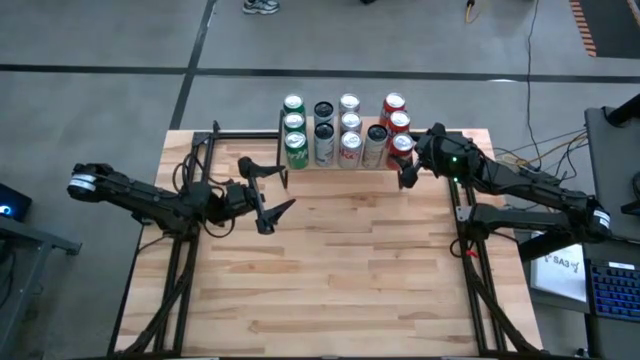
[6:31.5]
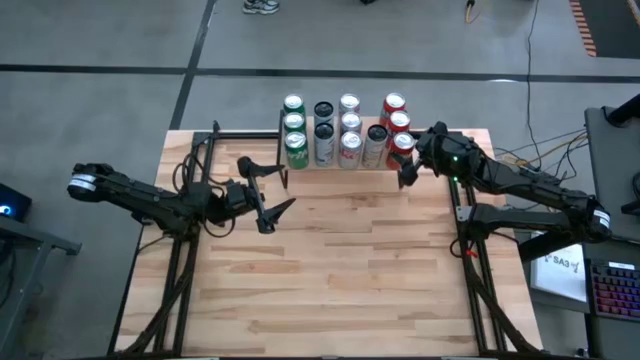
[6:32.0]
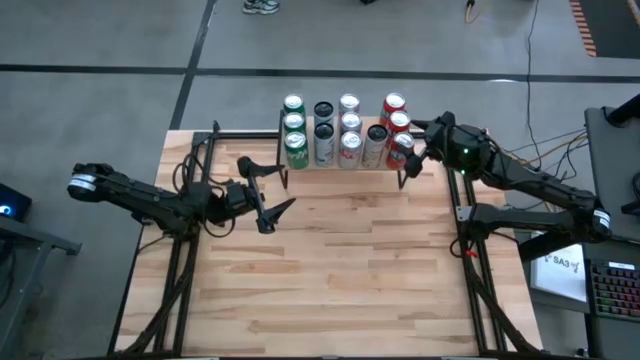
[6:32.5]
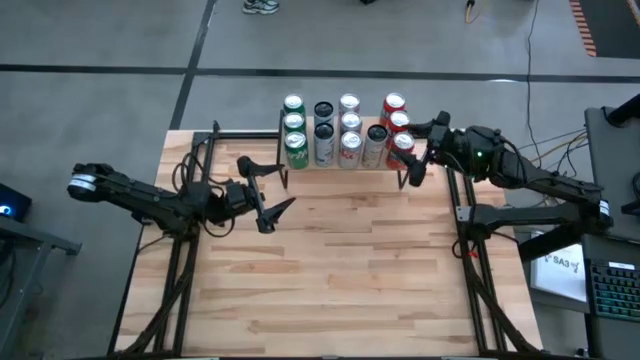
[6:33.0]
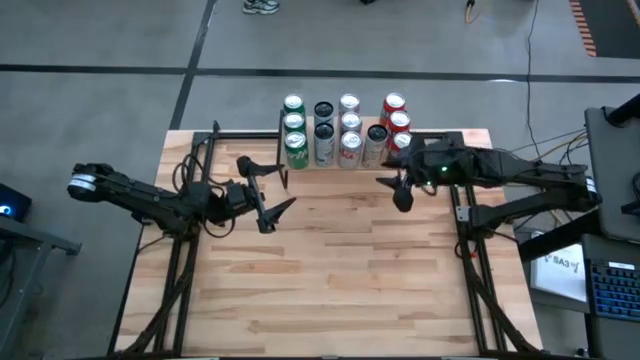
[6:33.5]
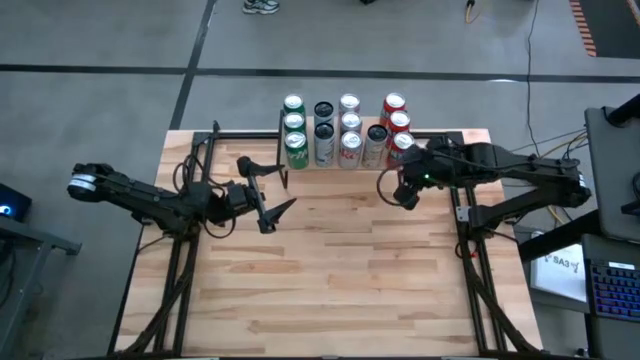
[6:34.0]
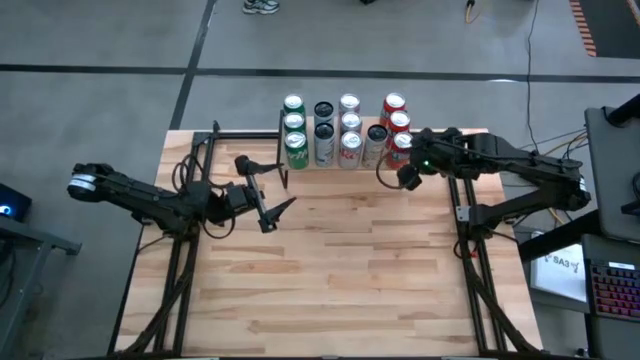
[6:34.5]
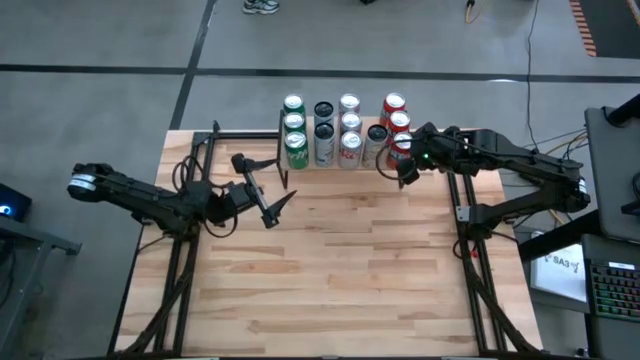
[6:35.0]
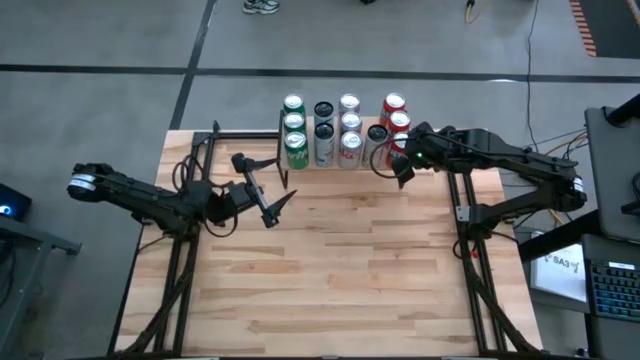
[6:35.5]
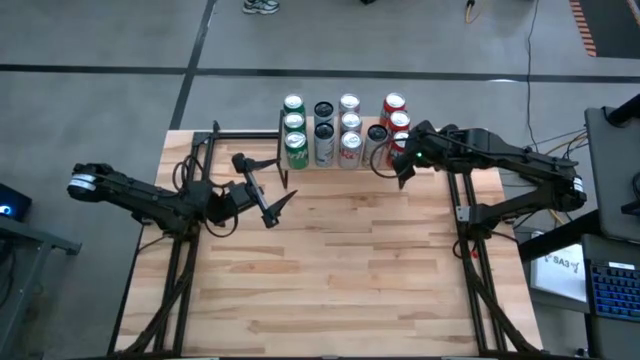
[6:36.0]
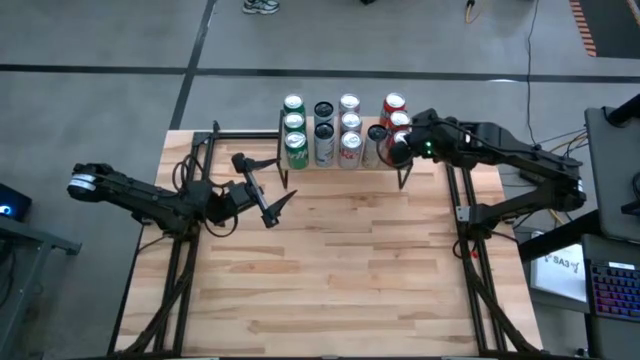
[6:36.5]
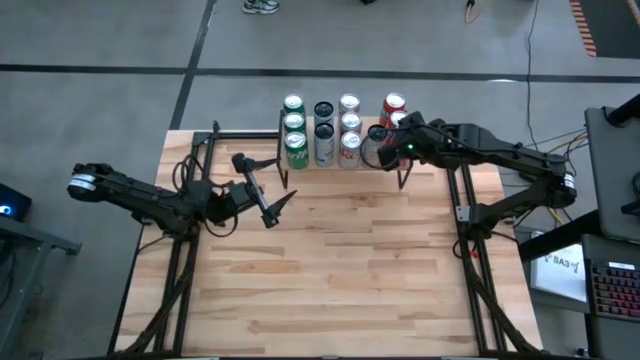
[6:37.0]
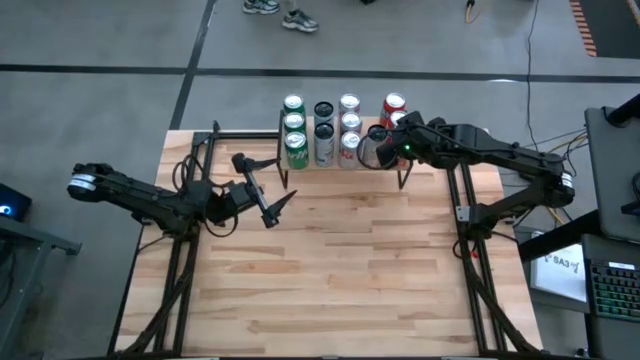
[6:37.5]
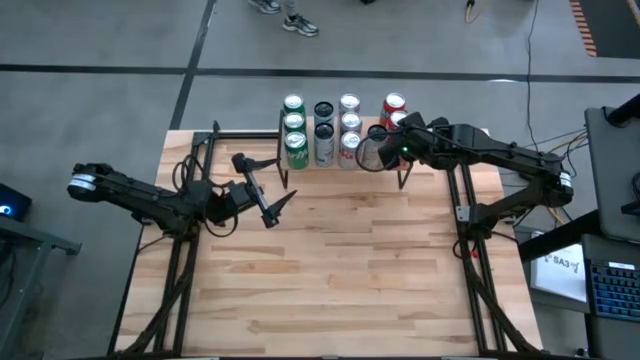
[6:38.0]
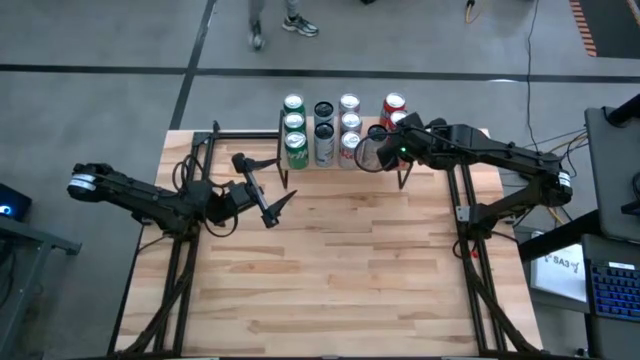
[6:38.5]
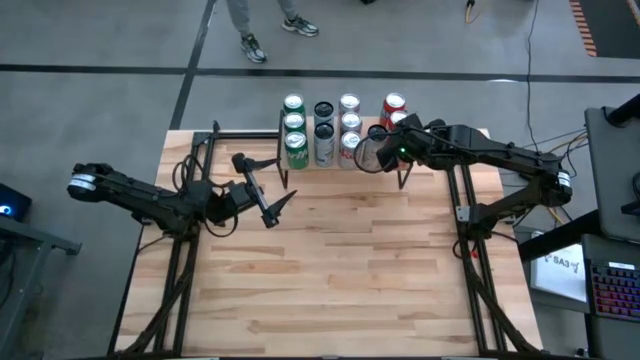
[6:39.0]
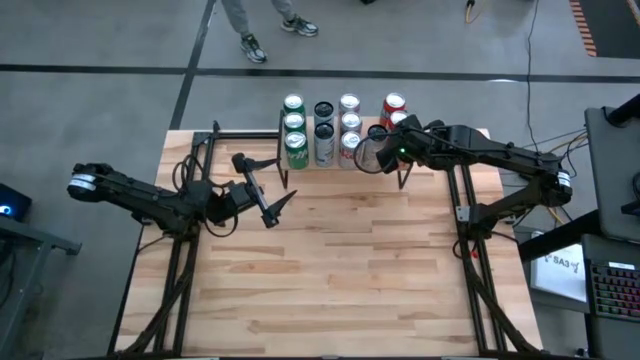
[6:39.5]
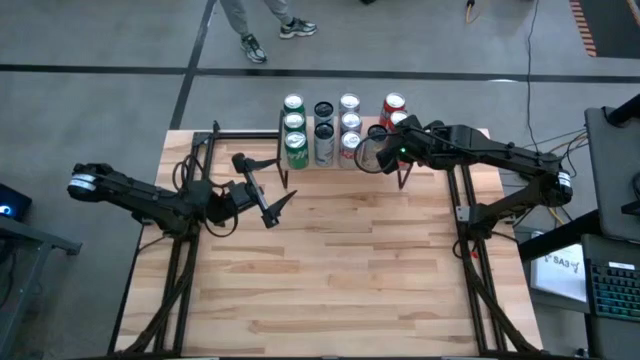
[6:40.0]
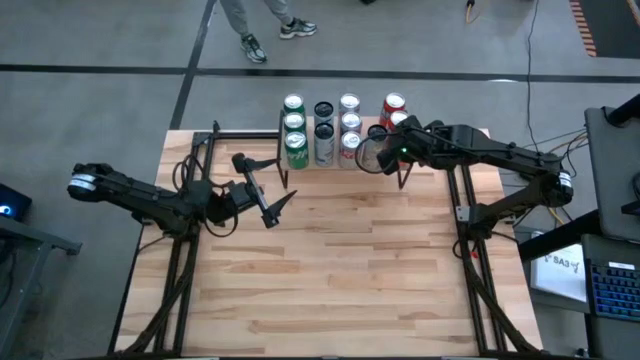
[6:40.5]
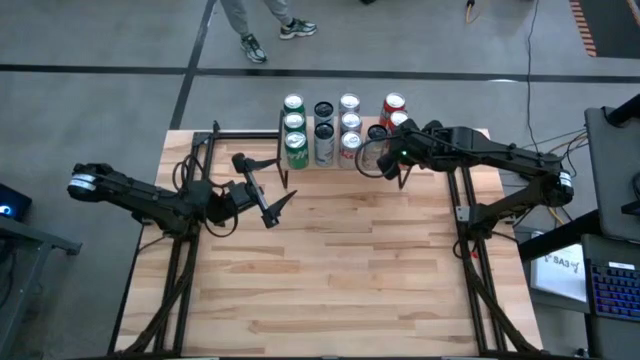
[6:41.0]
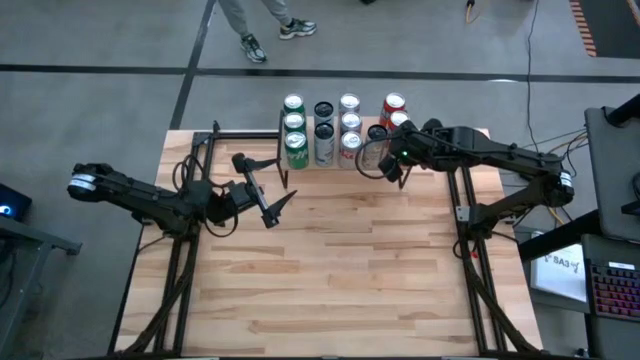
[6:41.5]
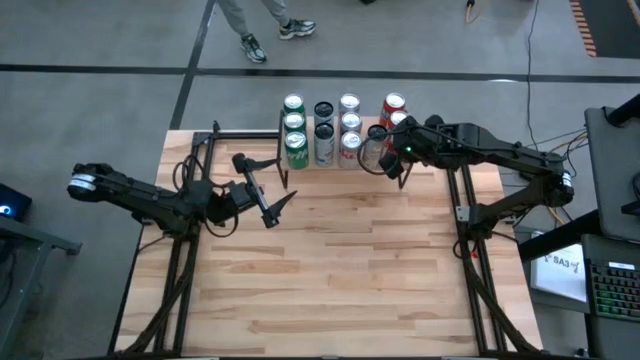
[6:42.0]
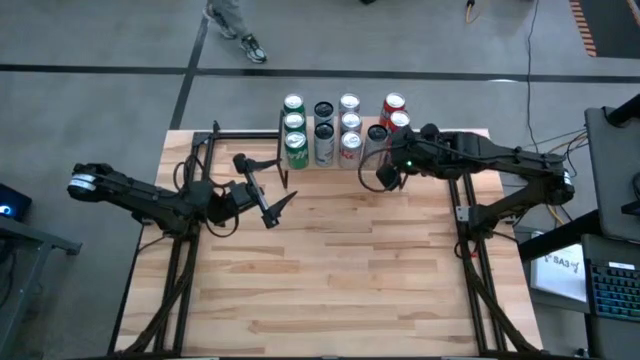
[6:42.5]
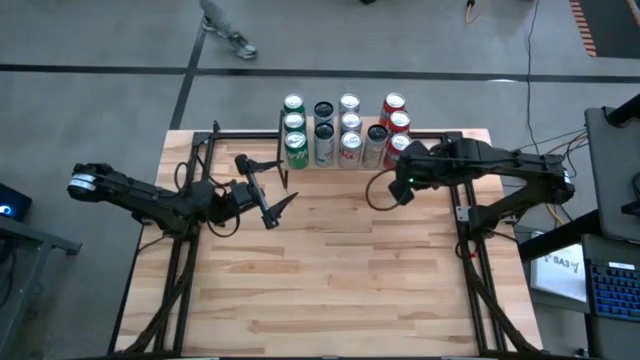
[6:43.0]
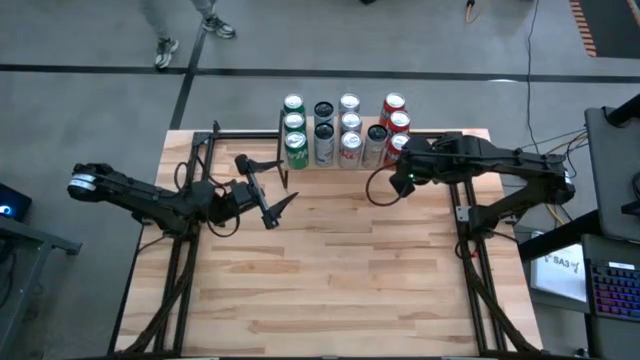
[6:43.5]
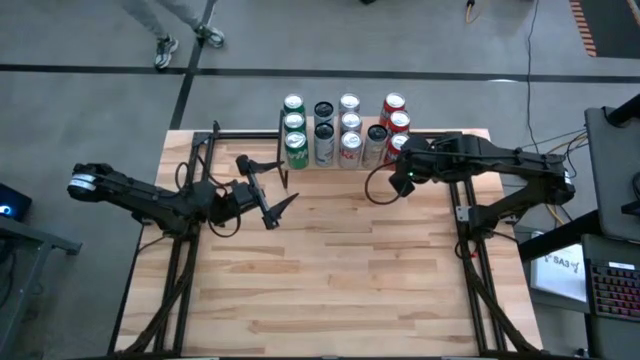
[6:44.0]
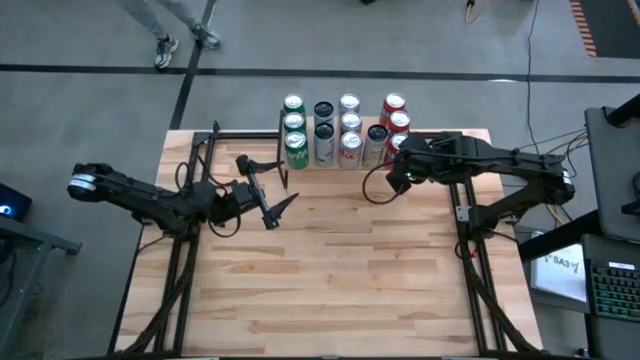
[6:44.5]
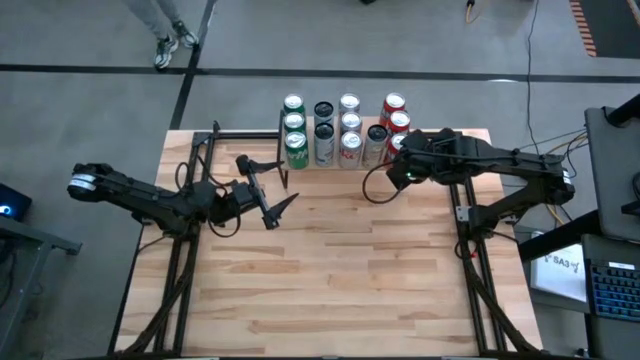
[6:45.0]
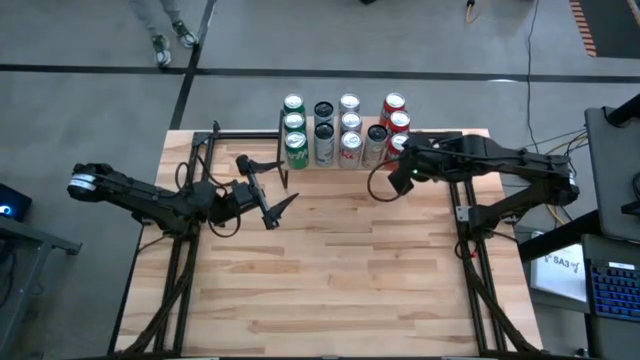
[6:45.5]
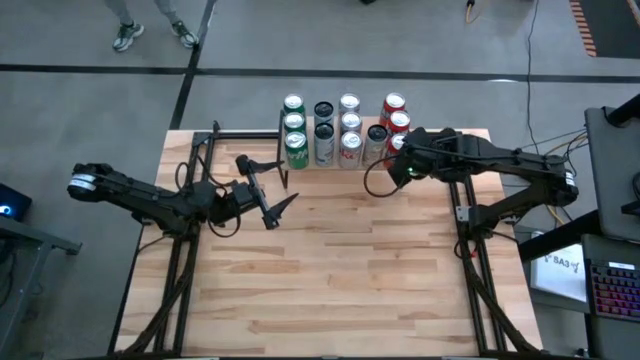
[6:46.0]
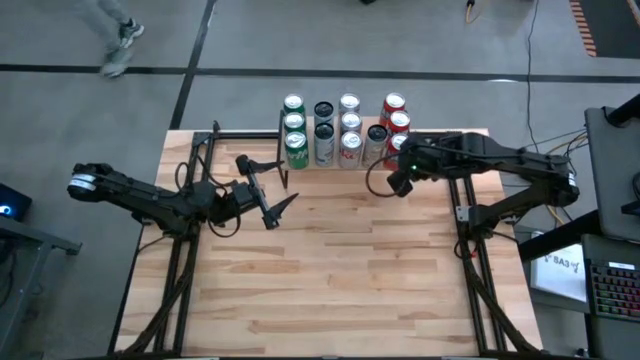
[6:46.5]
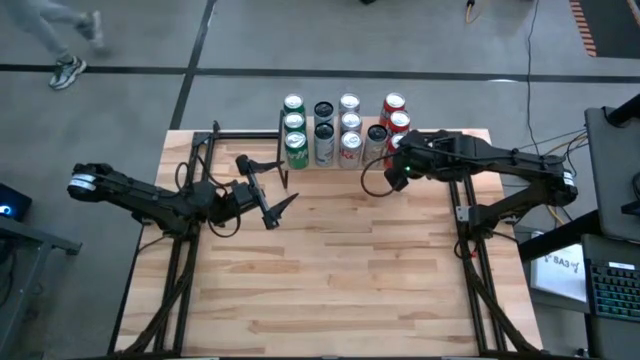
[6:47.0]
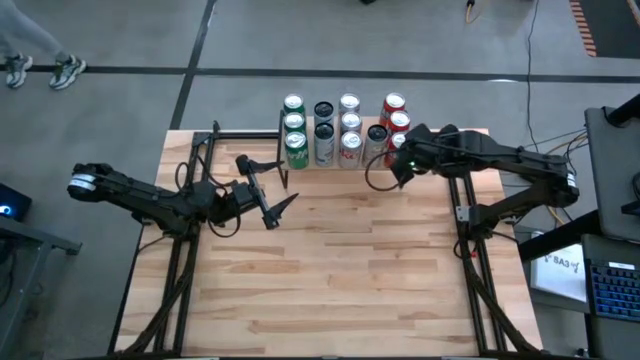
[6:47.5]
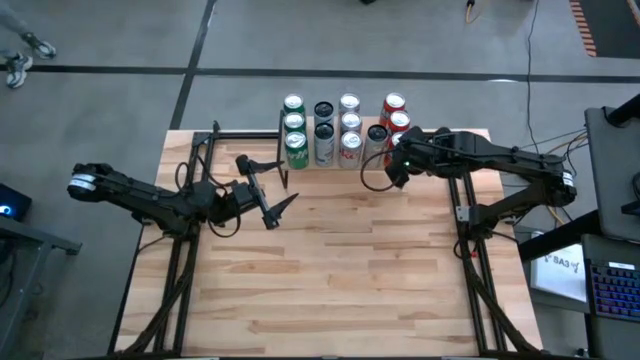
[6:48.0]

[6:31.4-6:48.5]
Task: Place canned beverage on shelf
Put the orange soda can on the shelf aligned with the other orange soda cans
